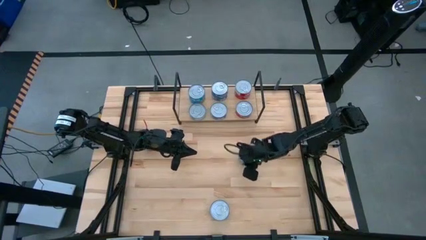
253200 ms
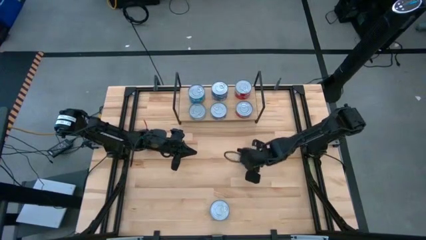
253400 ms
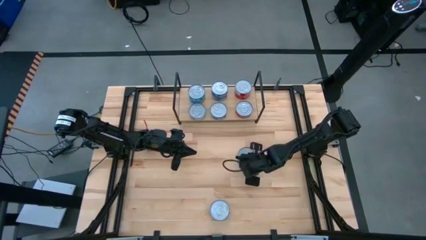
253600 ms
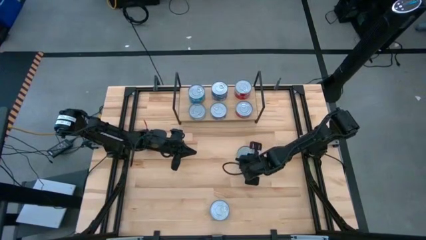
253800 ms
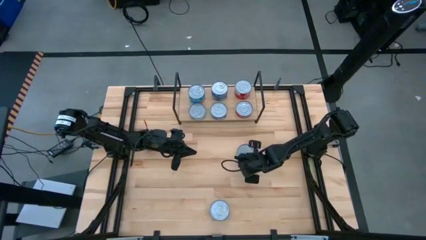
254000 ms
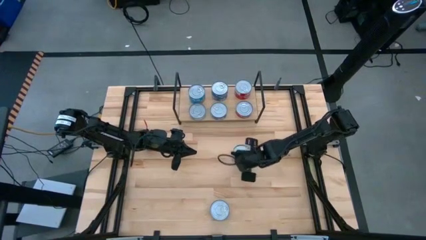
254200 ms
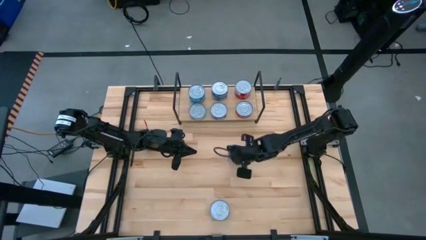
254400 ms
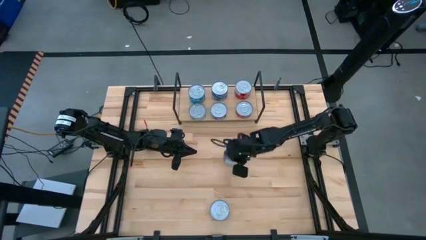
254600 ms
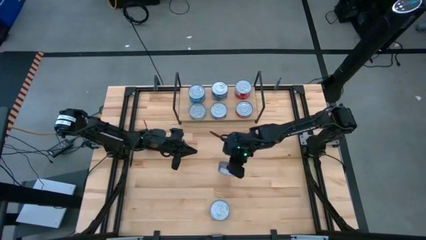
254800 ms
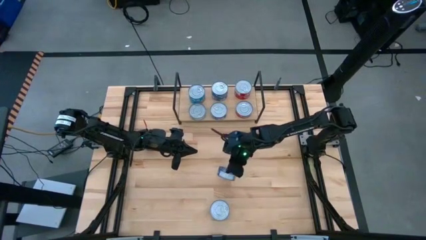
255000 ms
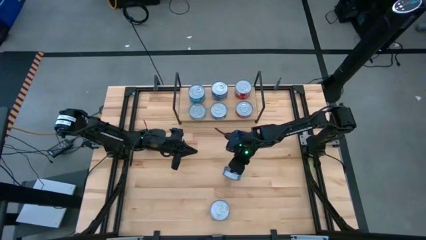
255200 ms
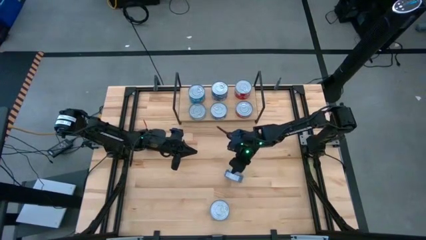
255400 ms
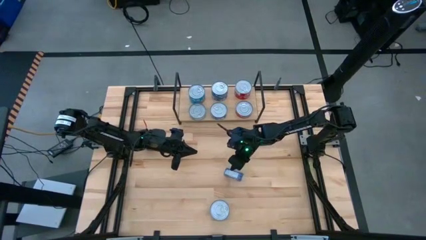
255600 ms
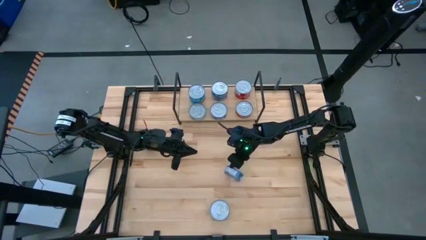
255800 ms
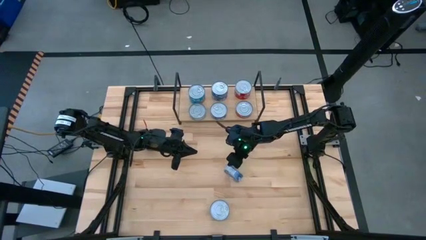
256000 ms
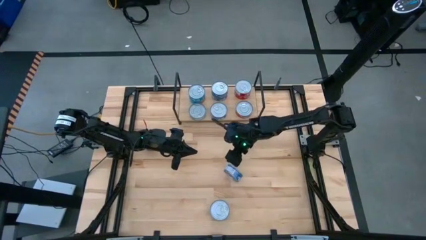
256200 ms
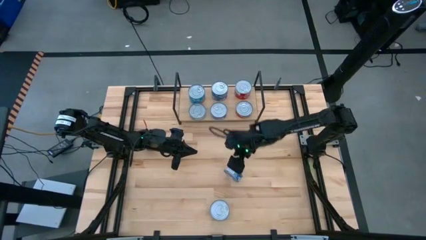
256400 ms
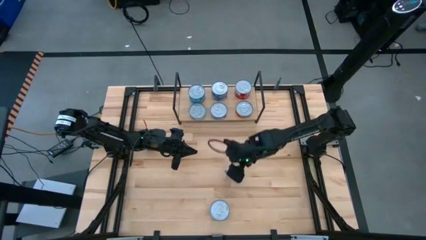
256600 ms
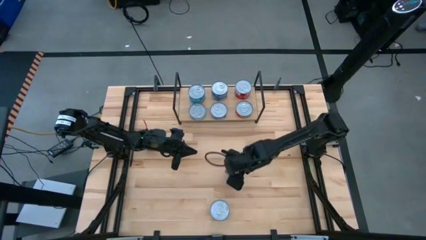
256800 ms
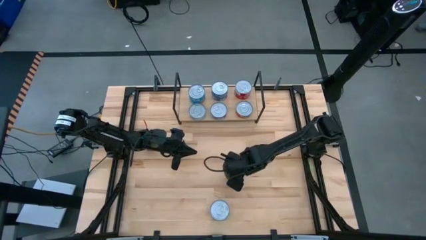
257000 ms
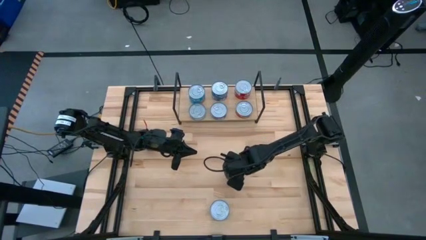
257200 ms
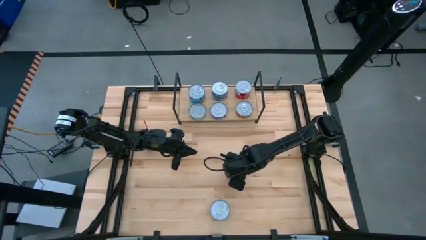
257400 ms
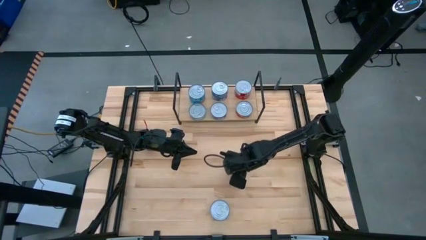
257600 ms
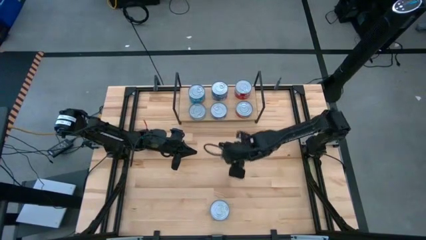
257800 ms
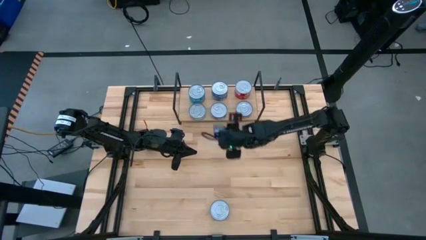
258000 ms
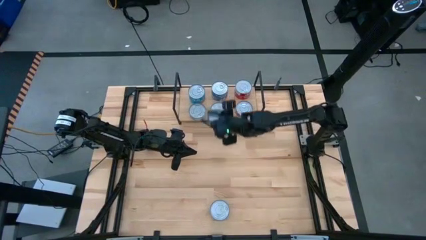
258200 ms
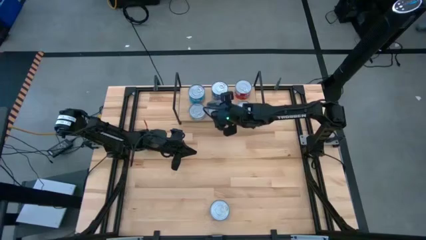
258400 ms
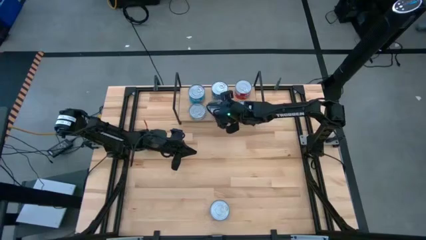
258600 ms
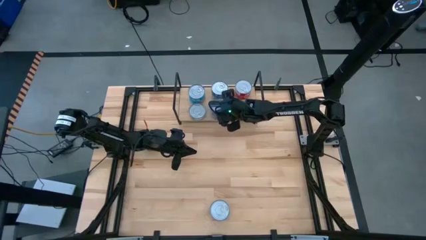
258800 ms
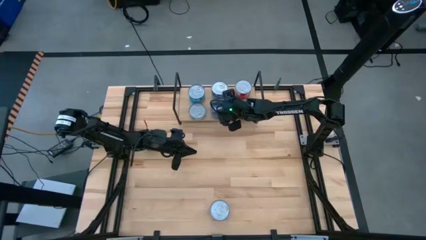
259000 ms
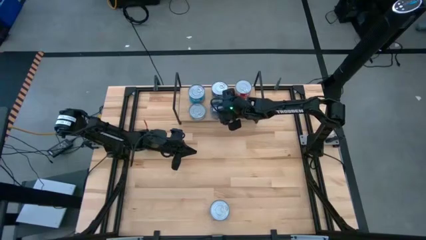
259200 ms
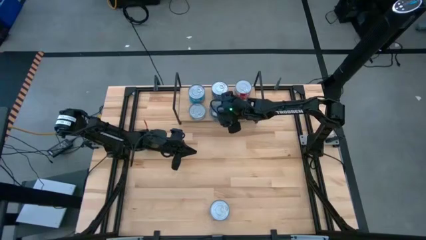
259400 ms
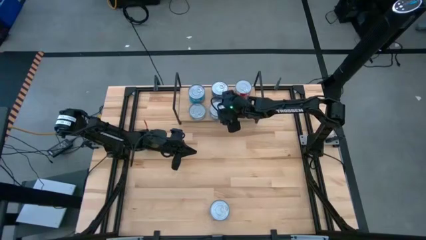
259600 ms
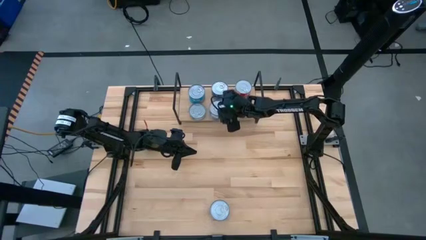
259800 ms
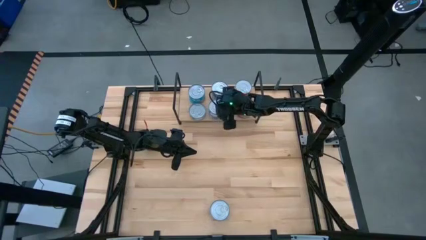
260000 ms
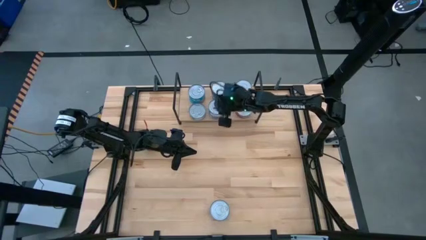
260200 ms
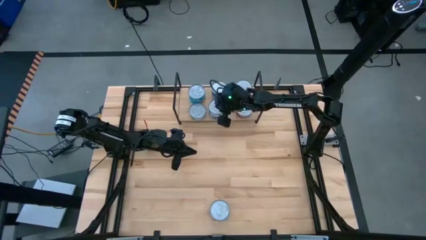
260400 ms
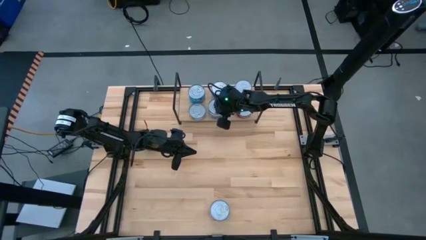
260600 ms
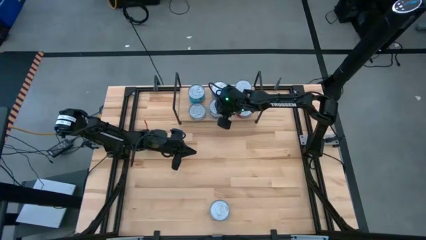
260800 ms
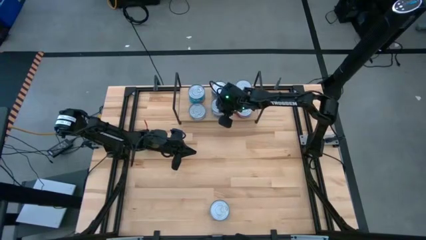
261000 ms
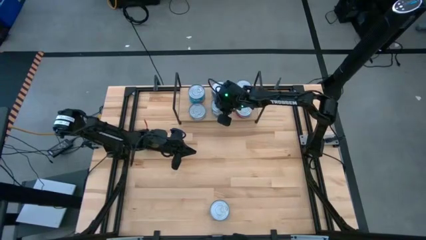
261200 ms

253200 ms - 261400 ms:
Task: Stack canned seafood by type on shelf
Stack the middle right blue tuna can on the top of the other blue tuna can on the shelf

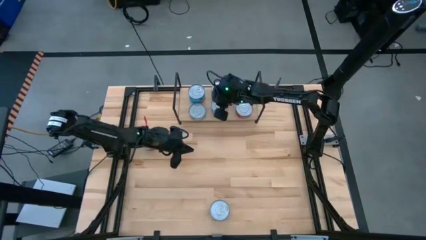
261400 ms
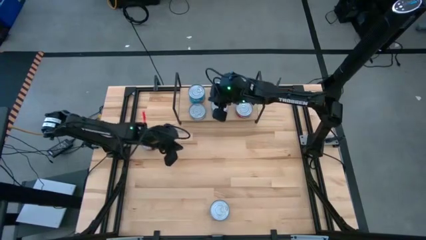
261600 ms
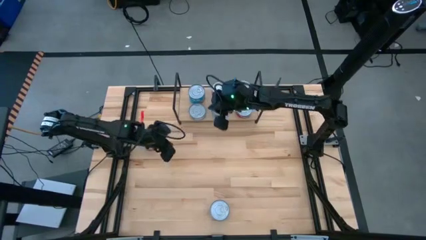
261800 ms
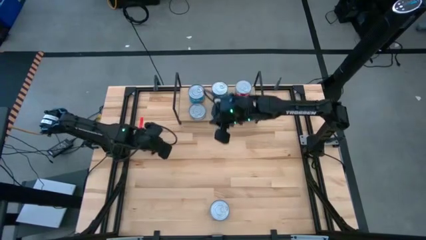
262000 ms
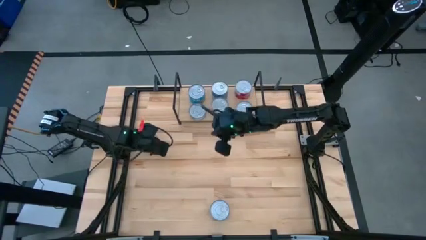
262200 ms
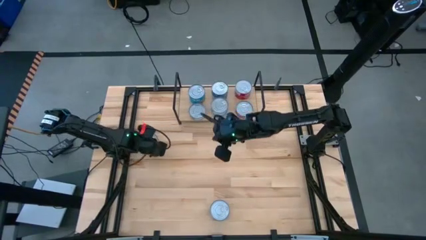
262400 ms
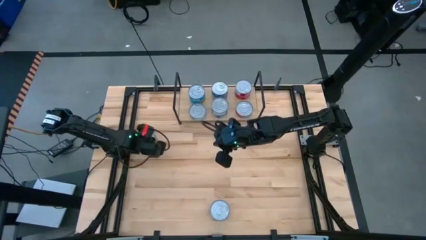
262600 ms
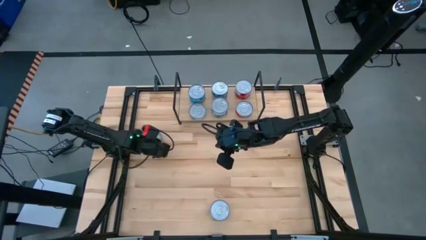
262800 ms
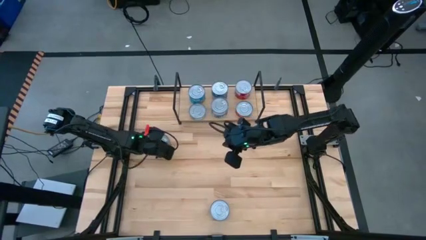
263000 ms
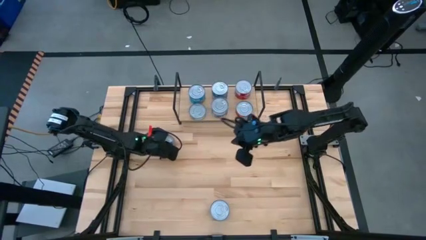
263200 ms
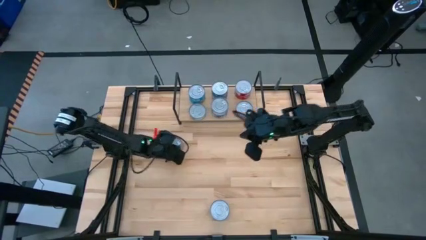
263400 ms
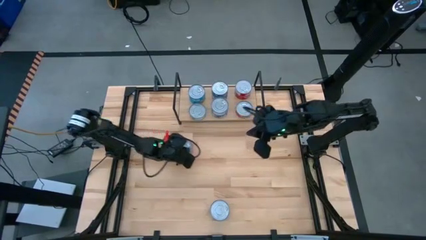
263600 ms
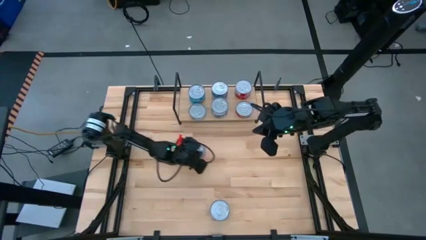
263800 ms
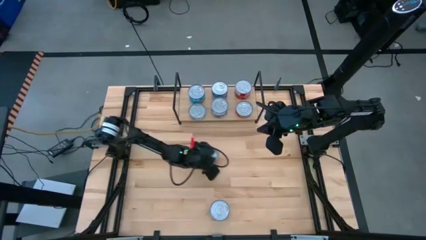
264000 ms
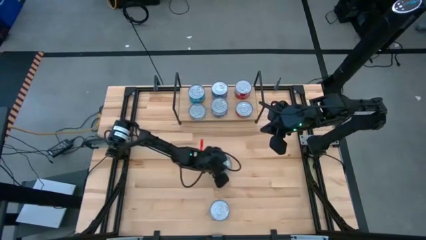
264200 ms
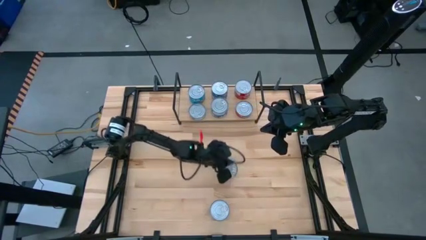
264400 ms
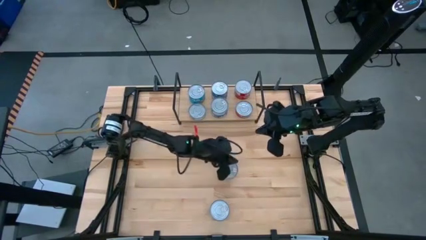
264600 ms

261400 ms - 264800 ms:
Move the middle left red tuna can to the center of the table

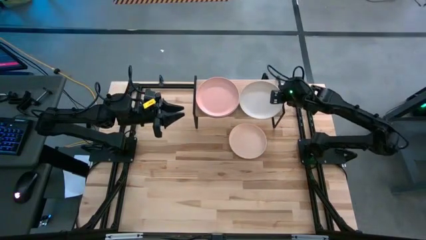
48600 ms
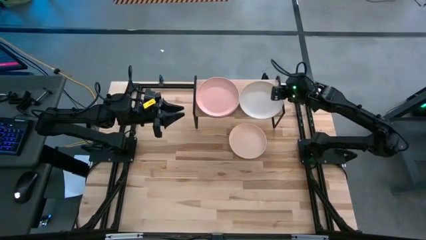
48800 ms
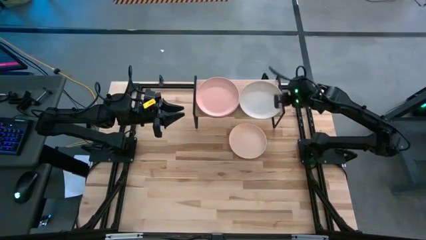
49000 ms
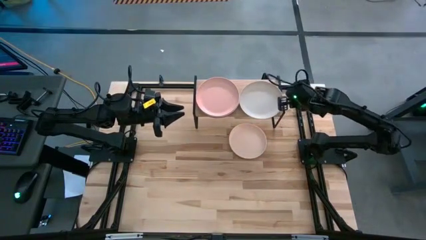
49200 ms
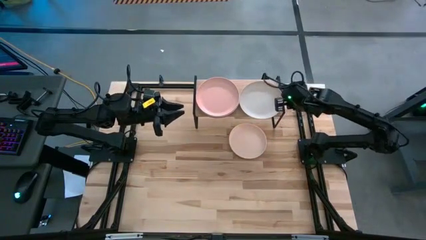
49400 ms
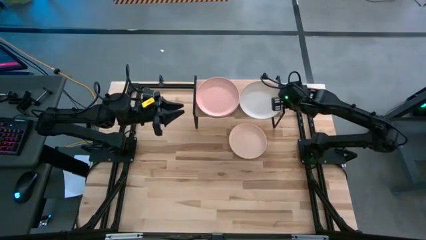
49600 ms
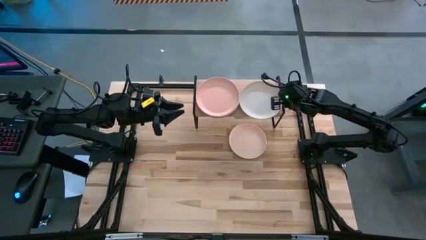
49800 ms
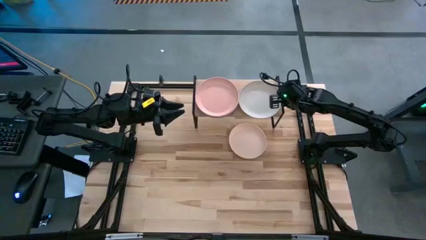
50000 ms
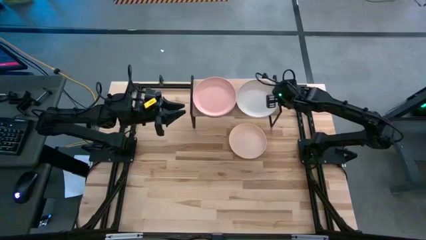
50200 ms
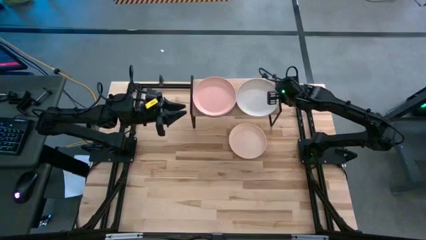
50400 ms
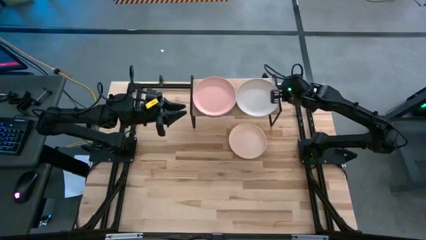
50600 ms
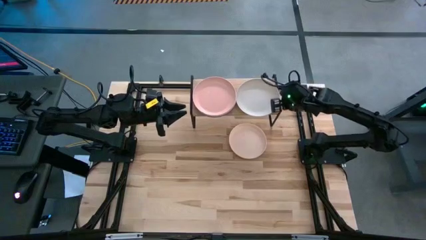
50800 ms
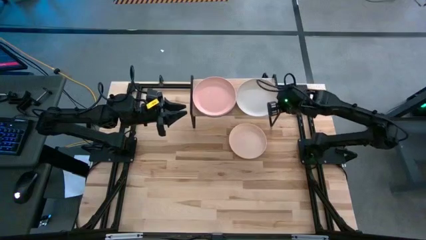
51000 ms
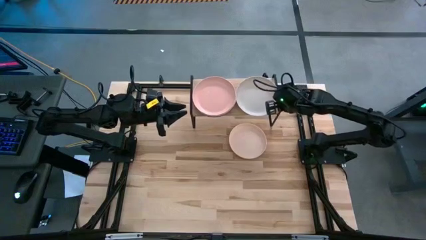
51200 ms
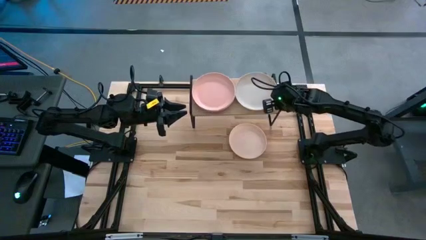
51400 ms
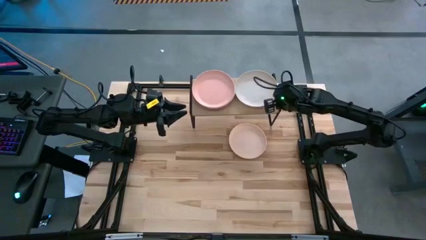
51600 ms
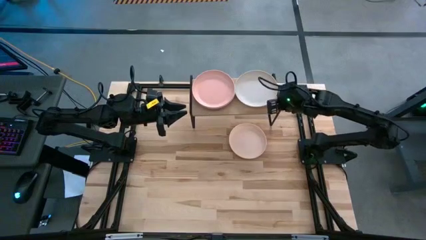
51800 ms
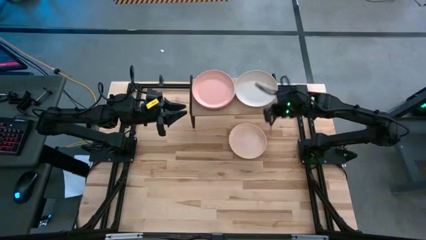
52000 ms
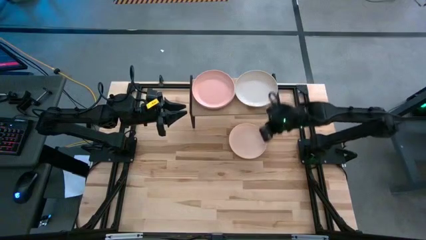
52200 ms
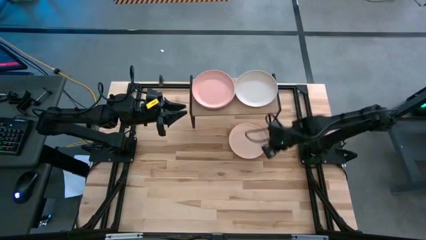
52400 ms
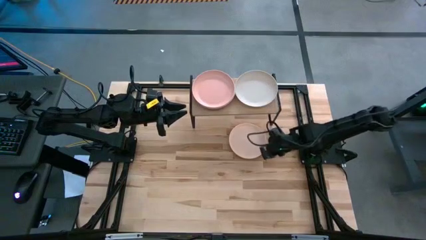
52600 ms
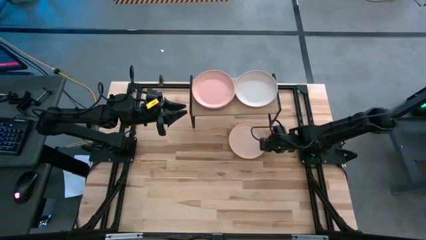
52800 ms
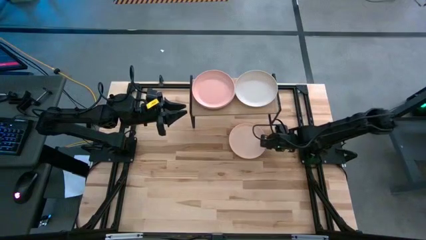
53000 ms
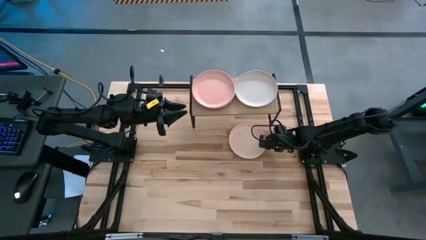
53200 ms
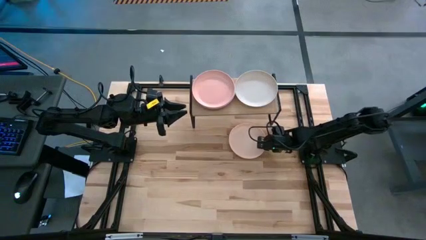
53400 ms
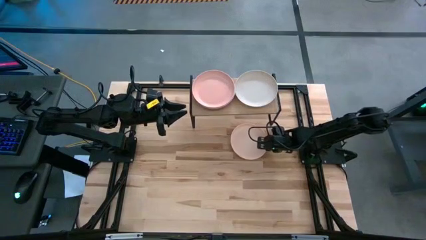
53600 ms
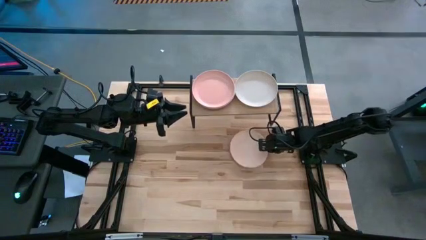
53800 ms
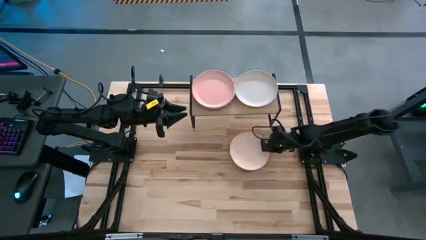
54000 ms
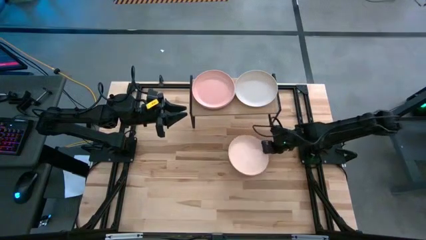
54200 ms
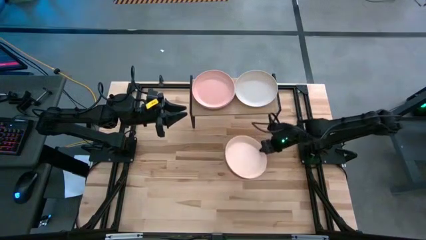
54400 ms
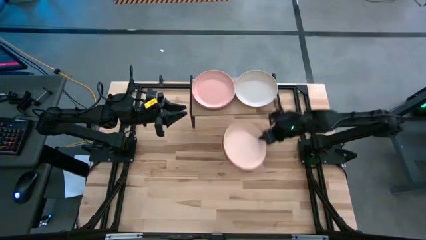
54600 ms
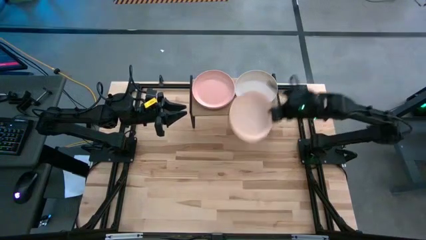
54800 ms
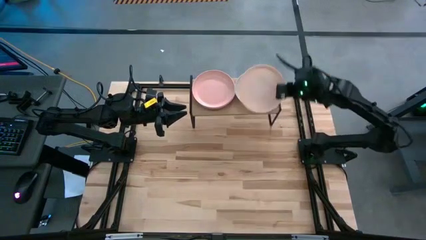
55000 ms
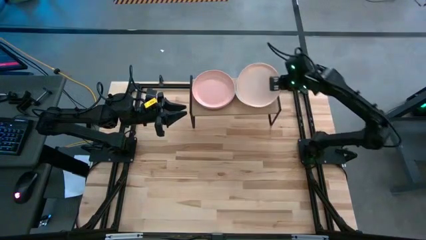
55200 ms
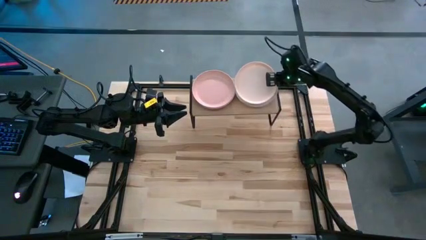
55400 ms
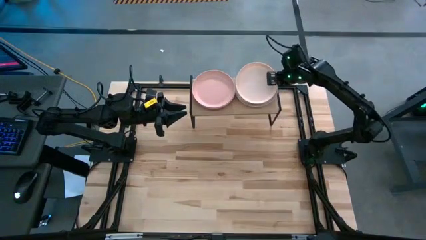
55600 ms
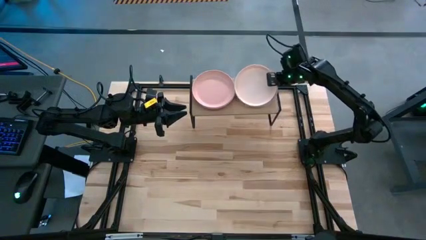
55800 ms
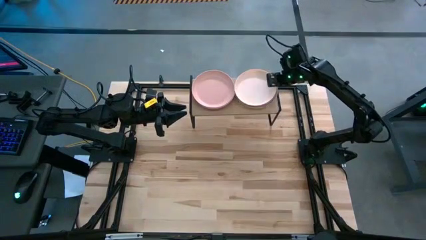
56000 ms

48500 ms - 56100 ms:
Task: Place and stack plates onto a shelf
Stack the white and light brown plates into the white plate
